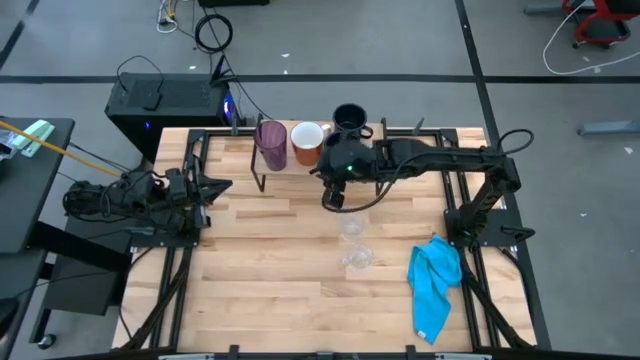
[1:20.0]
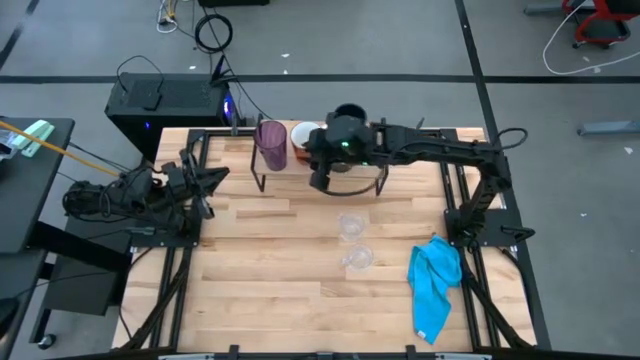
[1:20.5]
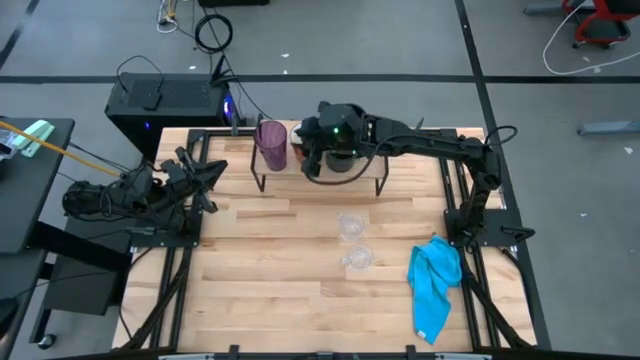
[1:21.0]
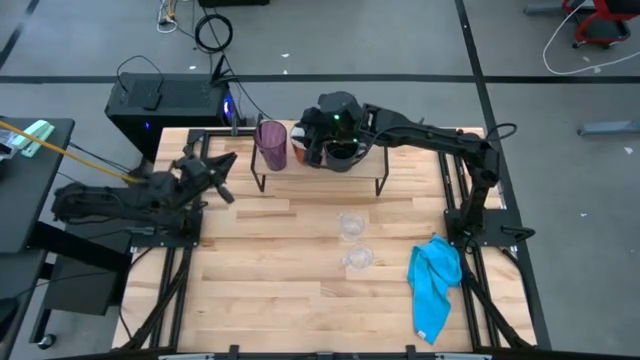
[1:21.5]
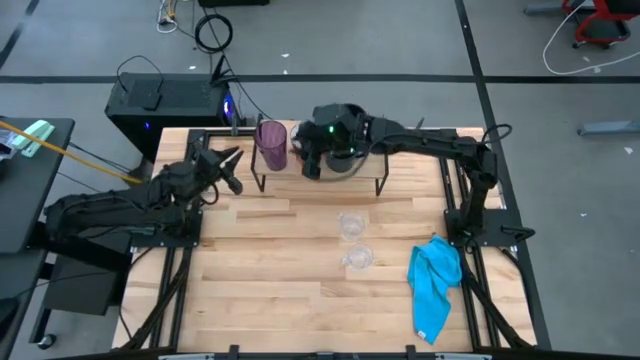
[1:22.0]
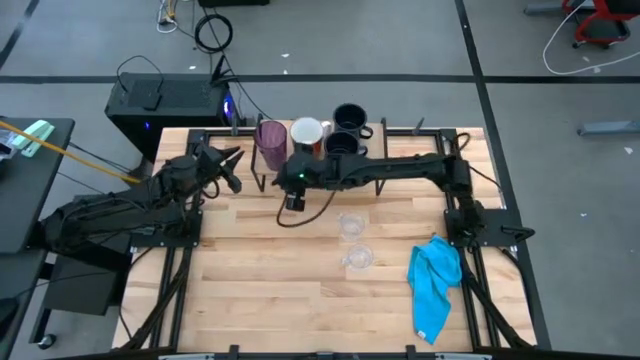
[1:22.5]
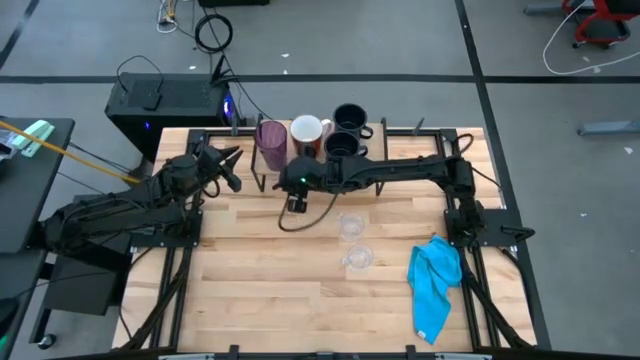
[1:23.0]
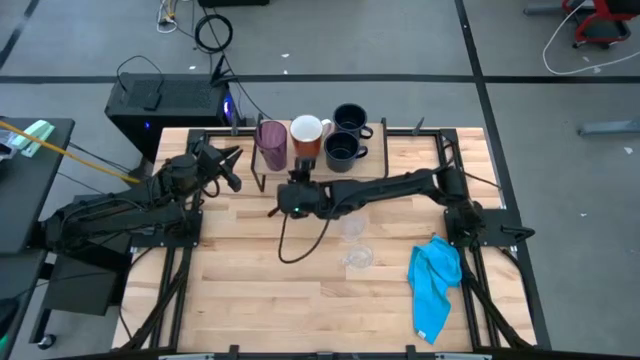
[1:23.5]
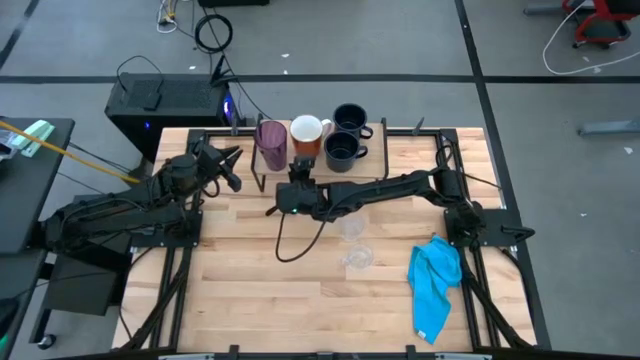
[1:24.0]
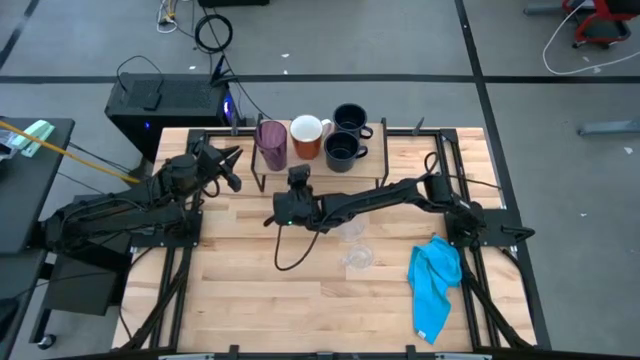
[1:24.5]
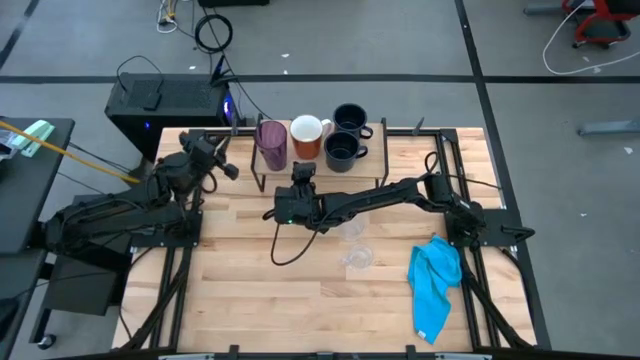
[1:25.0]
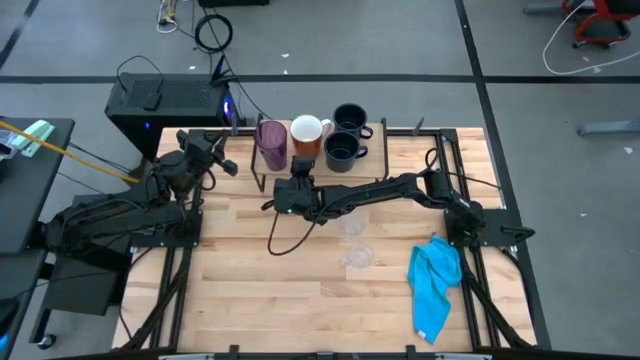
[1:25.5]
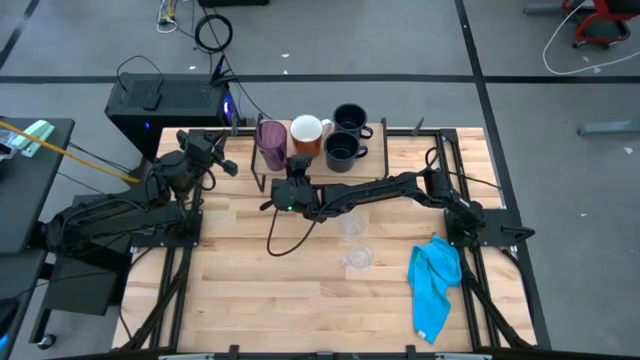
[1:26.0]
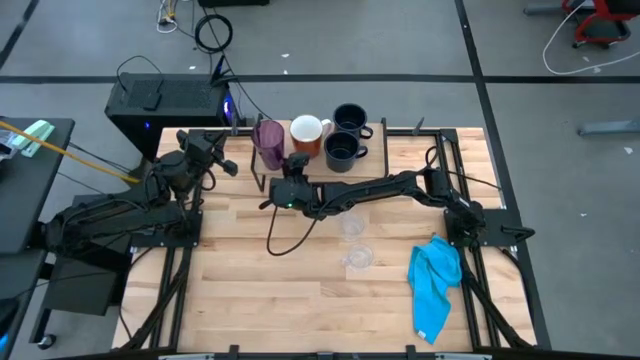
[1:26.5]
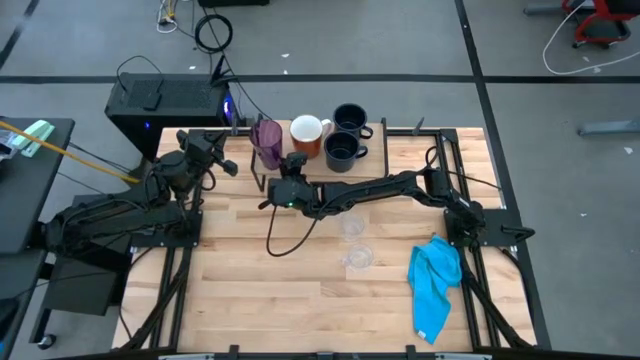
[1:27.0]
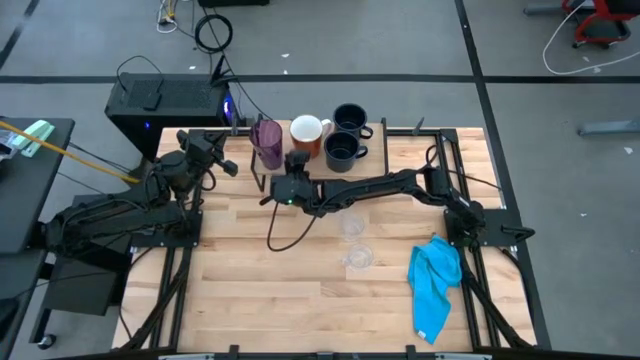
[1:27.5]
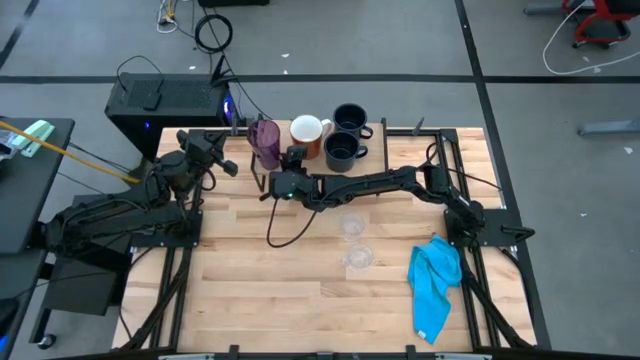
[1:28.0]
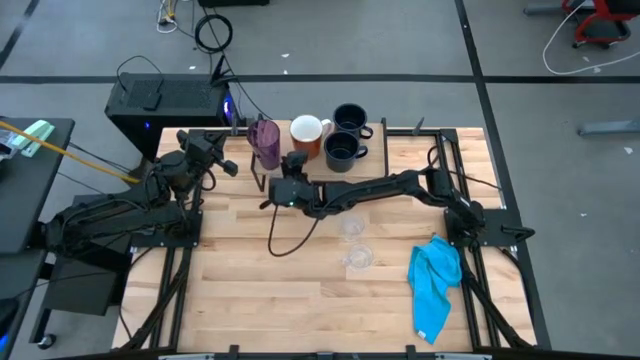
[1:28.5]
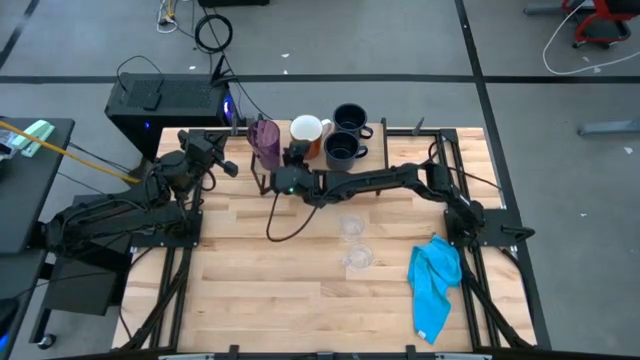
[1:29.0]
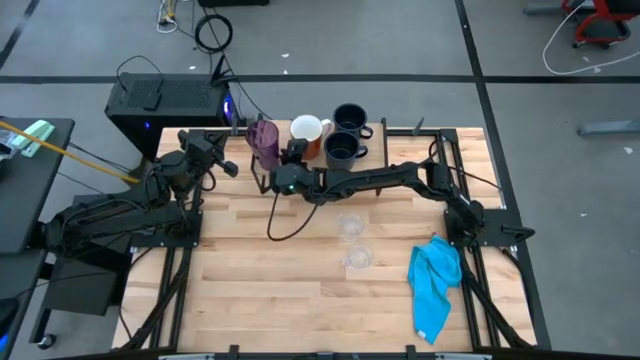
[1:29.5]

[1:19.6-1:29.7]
Task: Stack small to large cups/mugs on shelf
Adjust the purple cup on the shelf

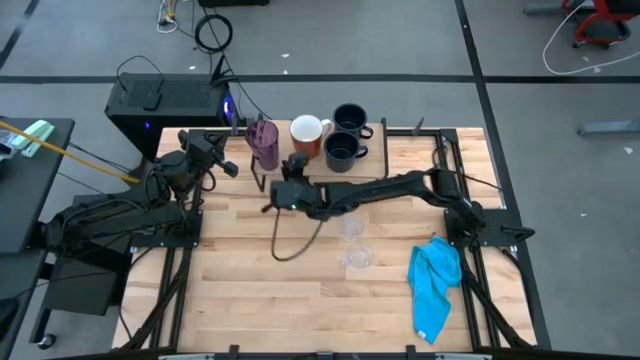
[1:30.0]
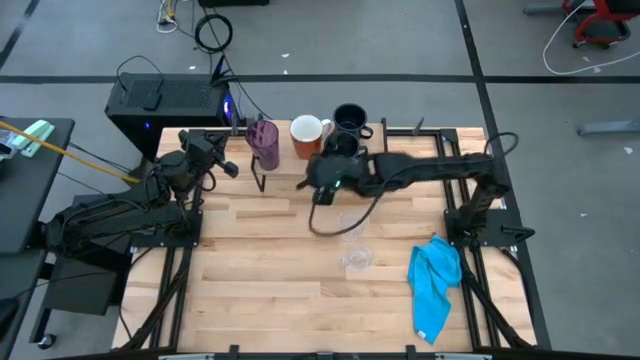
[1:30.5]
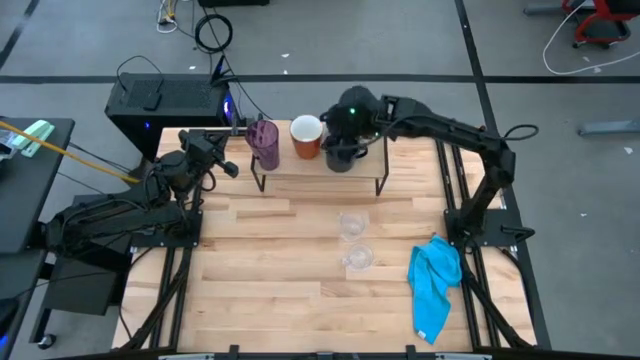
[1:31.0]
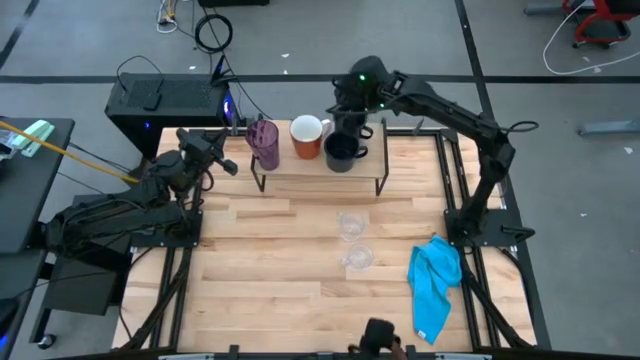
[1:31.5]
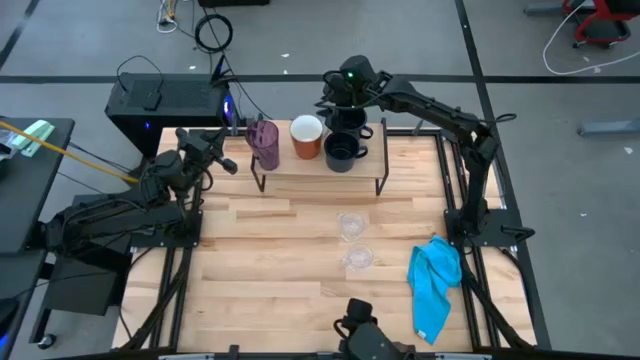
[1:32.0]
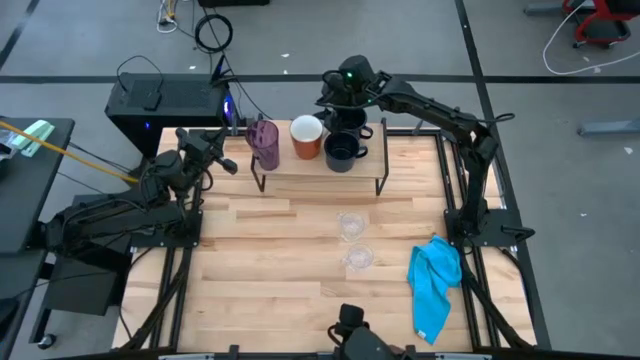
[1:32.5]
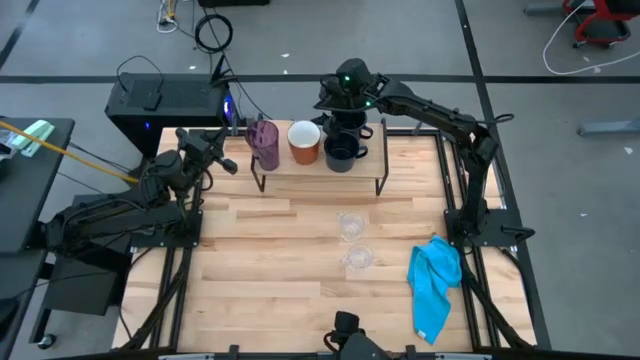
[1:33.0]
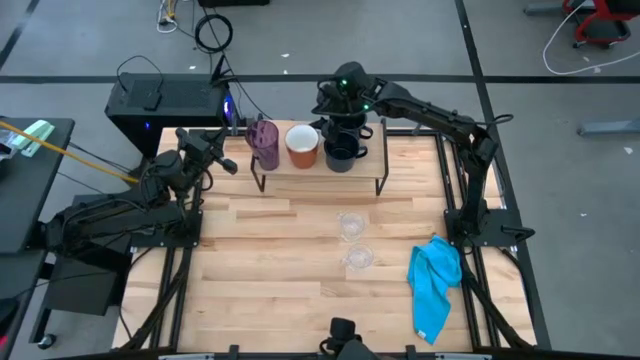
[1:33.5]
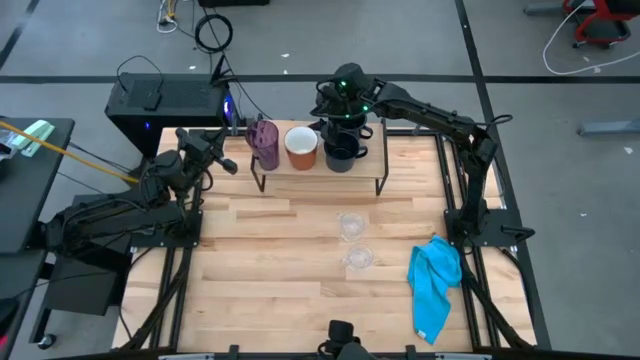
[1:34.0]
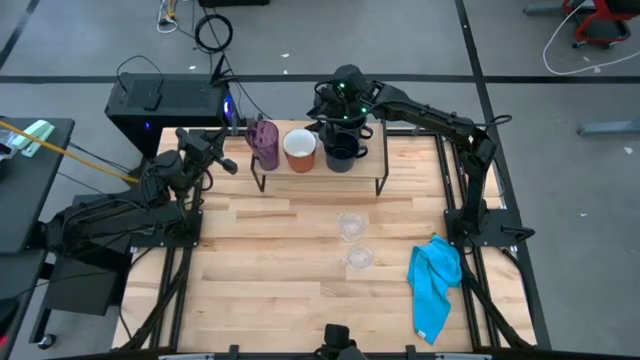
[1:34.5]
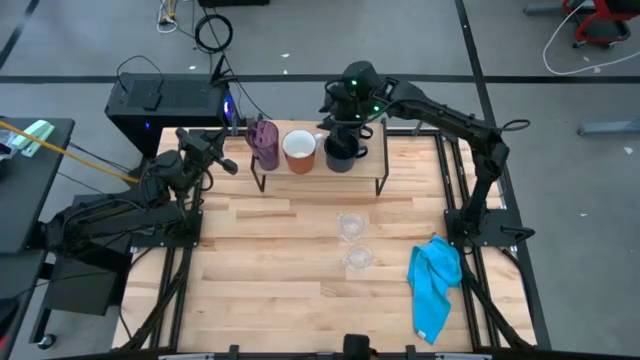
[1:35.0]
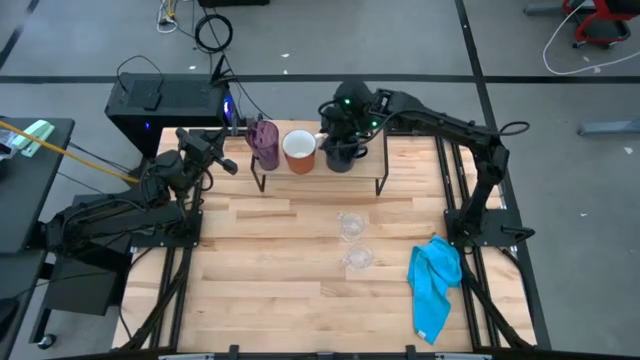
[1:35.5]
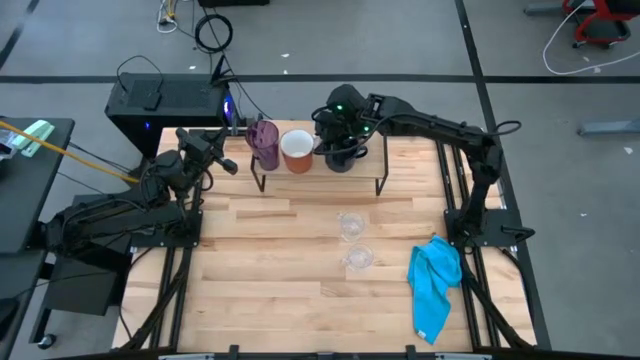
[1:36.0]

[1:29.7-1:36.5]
Adjust the orange mug on the shelf

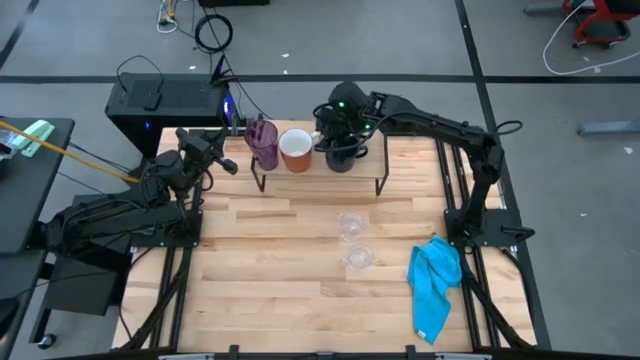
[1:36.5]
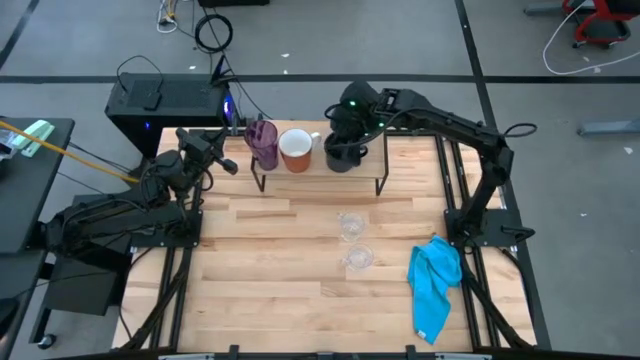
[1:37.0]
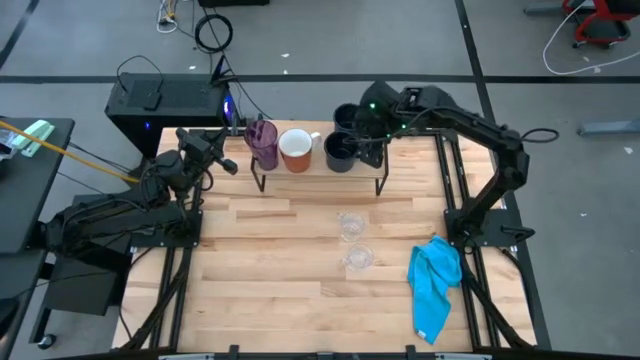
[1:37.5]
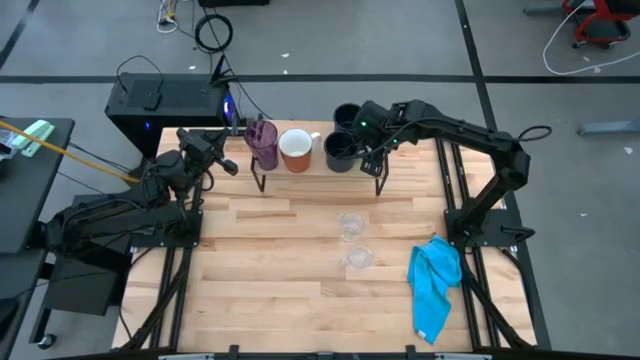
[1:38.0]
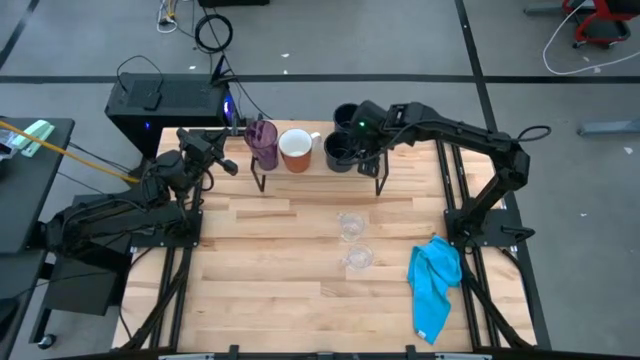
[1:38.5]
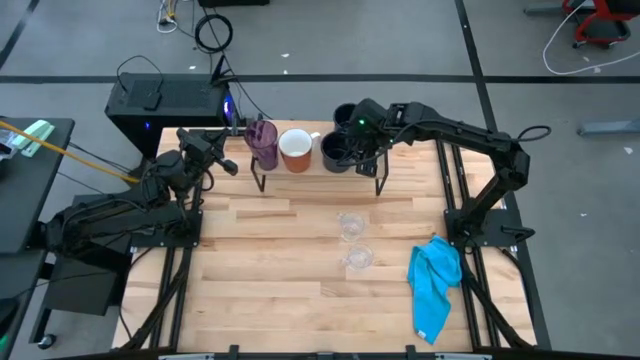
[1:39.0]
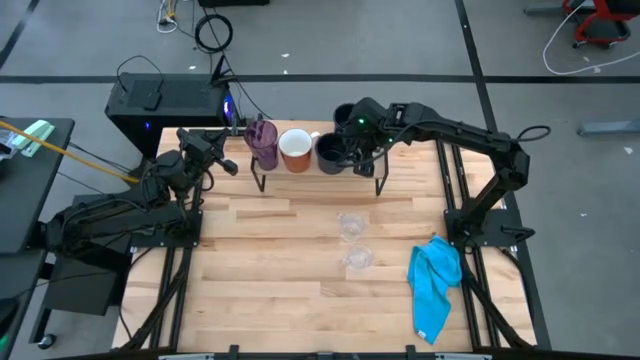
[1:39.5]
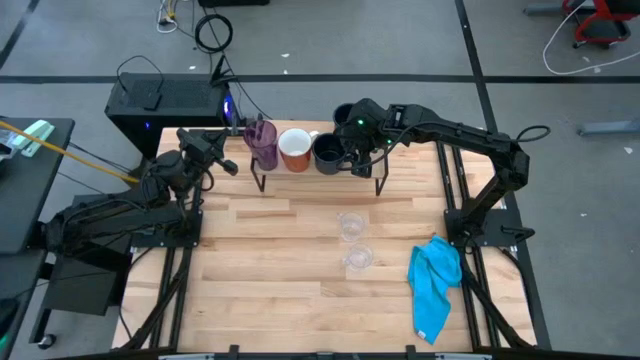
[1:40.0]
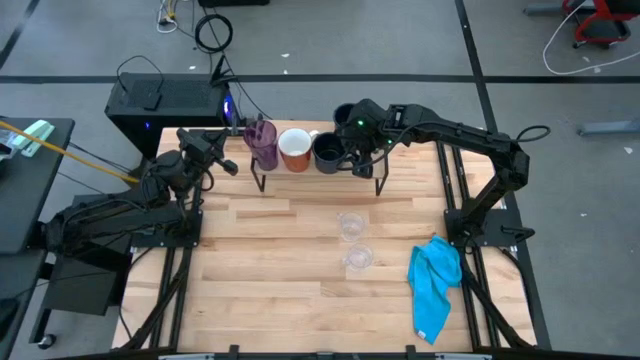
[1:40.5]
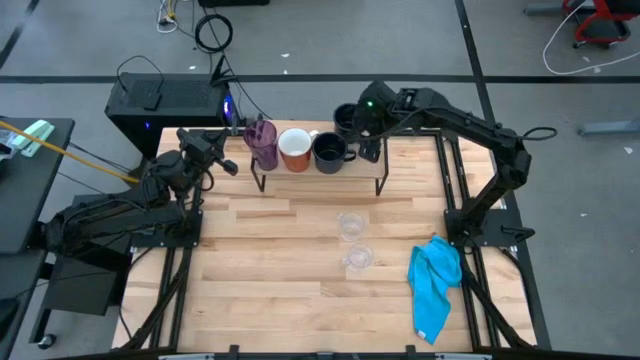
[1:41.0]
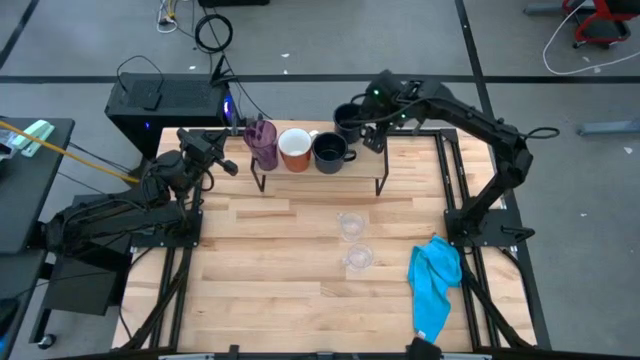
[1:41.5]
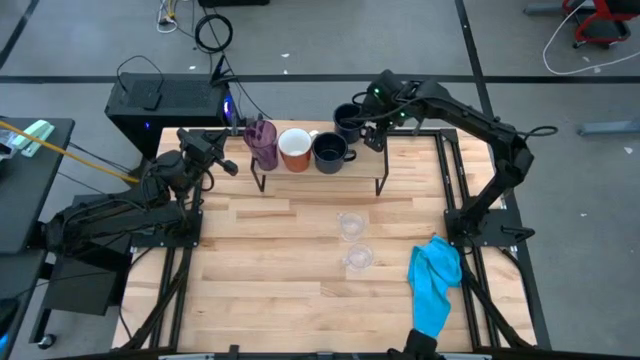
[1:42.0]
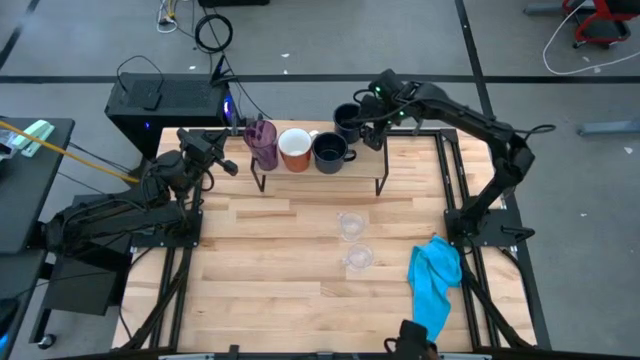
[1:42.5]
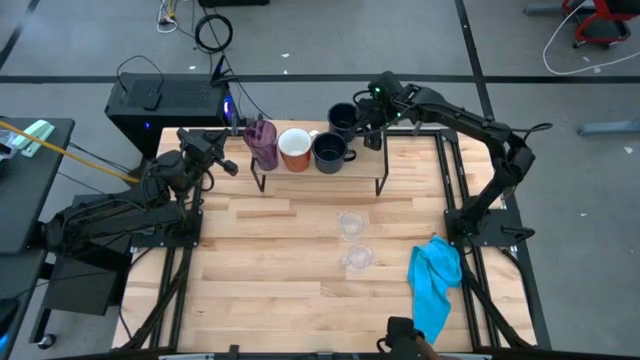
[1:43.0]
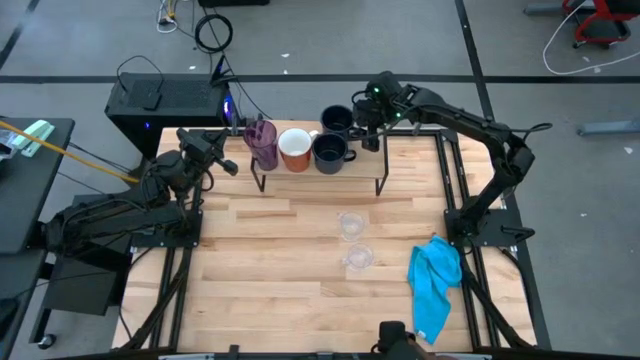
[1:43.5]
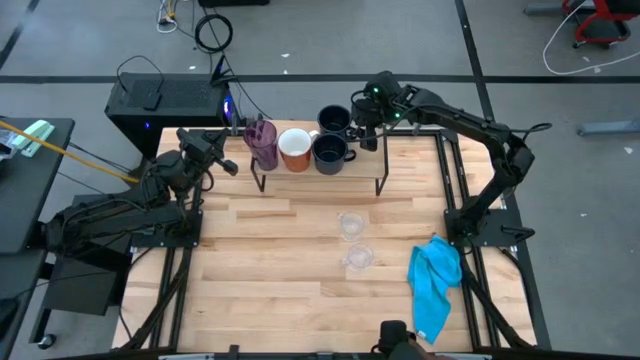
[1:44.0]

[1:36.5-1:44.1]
Adjust the dark blue mugs on the shelf
